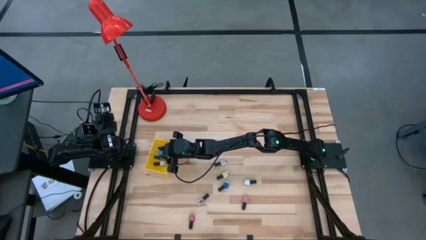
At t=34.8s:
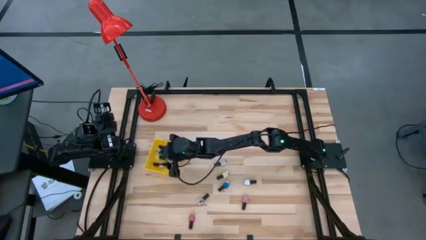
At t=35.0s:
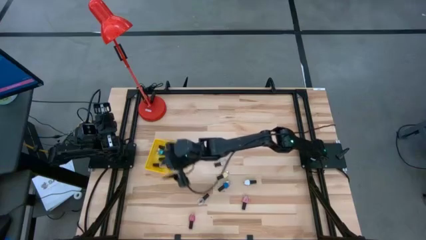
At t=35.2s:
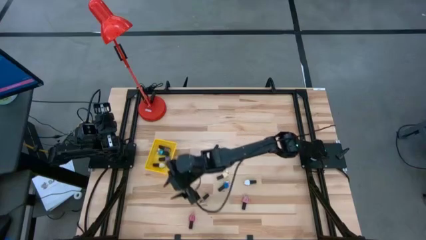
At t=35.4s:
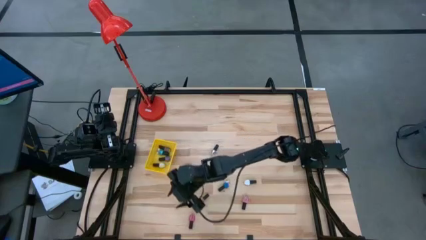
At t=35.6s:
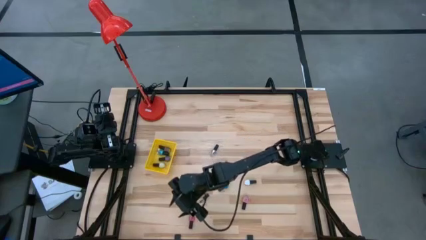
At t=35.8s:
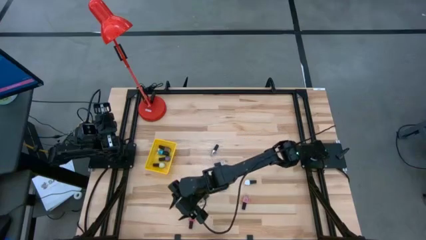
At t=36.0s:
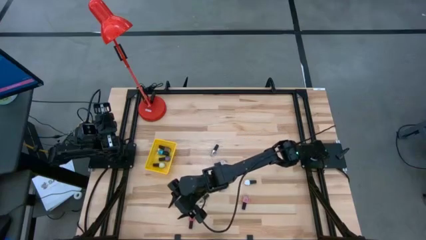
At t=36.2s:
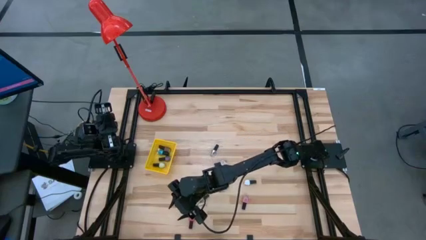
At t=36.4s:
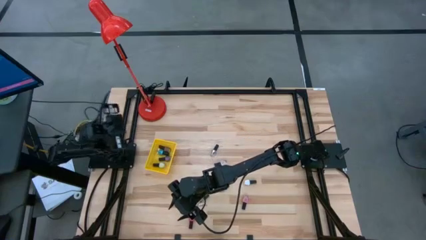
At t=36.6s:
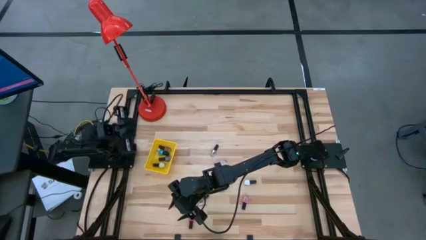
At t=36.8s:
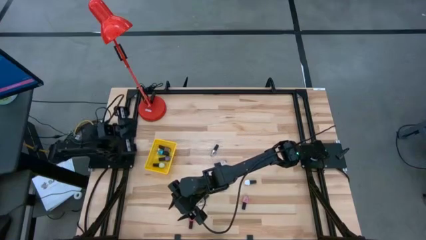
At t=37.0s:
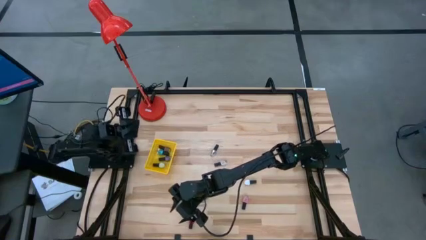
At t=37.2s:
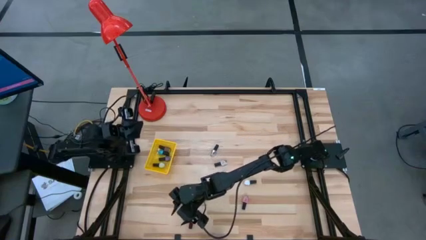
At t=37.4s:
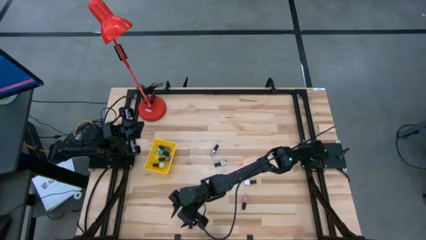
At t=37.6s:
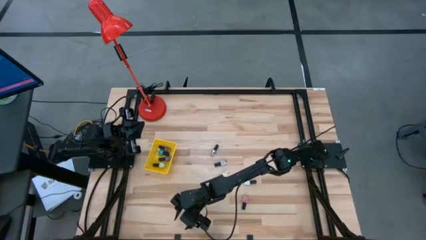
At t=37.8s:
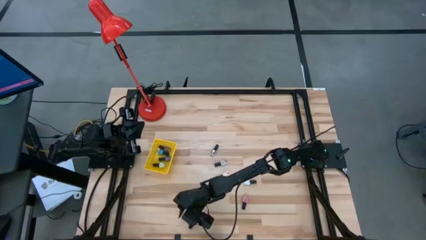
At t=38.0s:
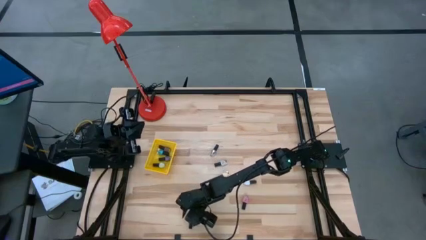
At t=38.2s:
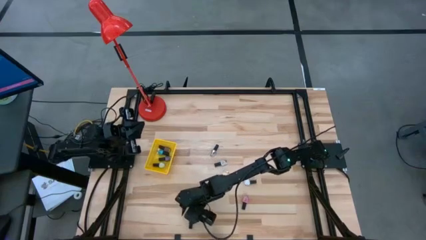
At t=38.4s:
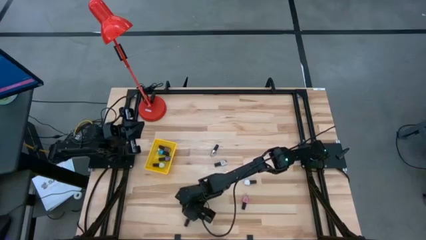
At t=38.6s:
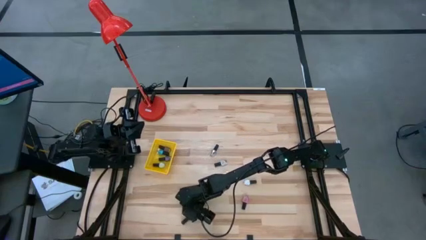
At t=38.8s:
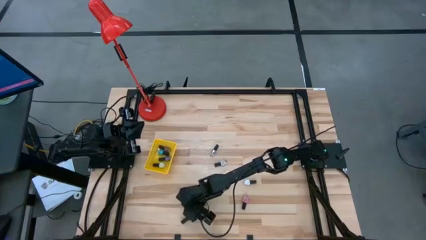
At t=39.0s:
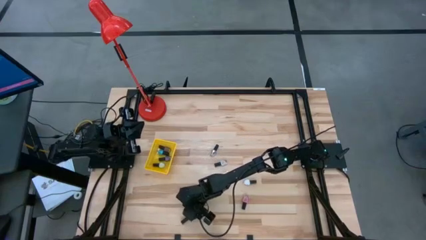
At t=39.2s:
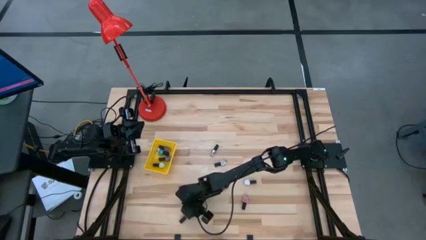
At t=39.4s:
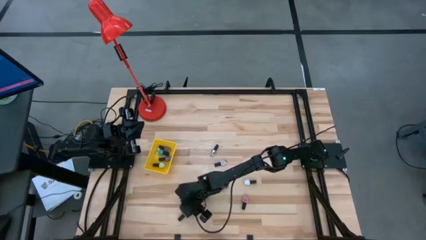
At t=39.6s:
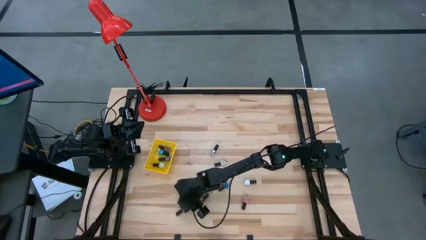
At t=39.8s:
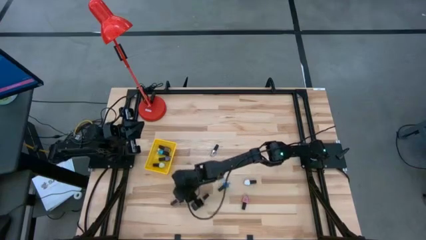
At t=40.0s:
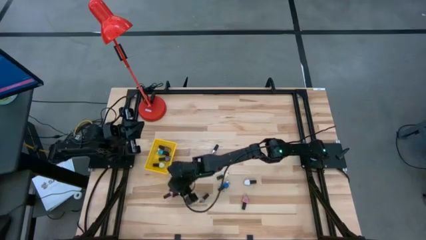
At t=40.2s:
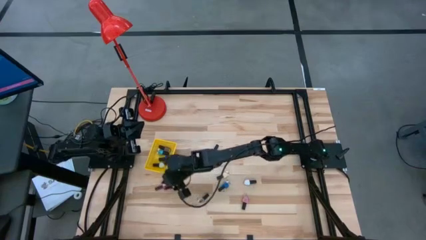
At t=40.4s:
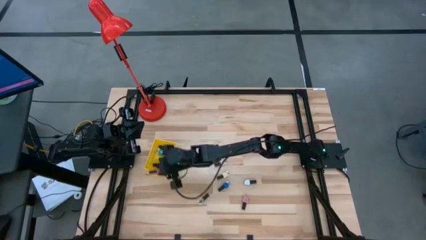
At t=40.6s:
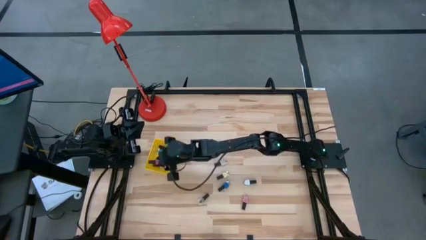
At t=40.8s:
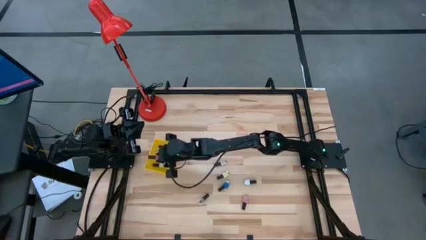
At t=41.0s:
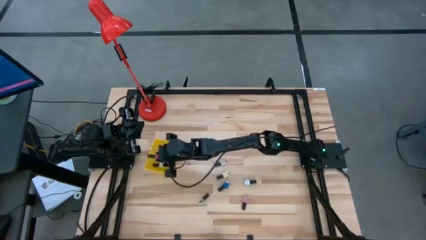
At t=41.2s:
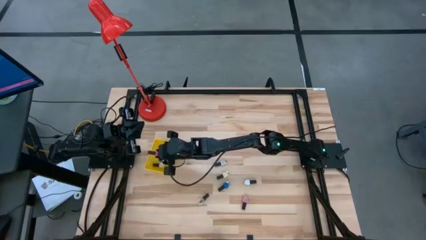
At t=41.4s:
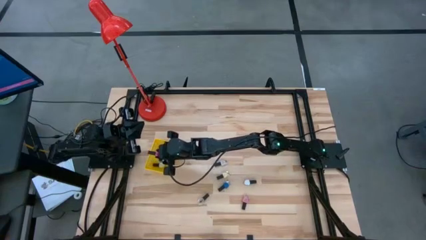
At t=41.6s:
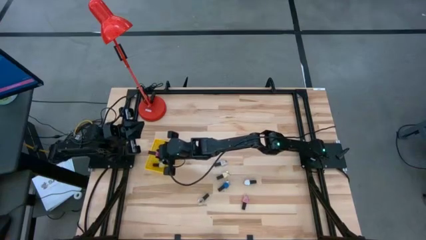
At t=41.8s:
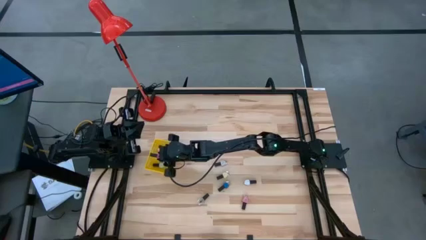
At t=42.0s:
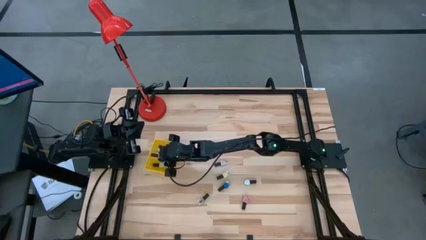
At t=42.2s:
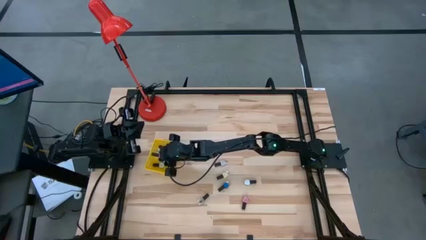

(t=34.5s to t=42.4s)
Task: Pick & Place Nail Polish
Put the red nail polish bottle into the yellow basket

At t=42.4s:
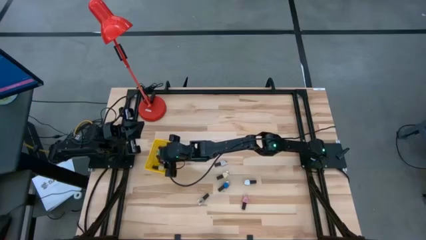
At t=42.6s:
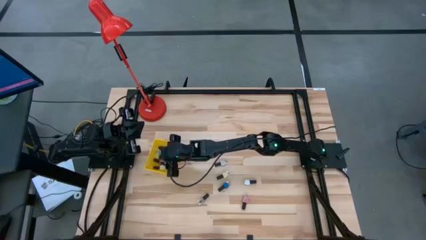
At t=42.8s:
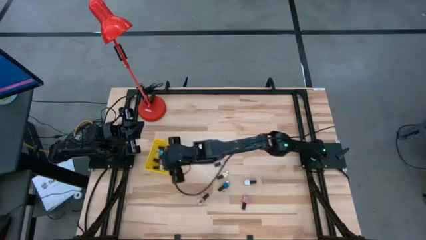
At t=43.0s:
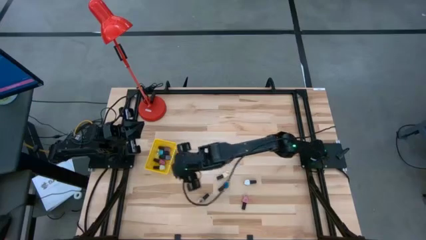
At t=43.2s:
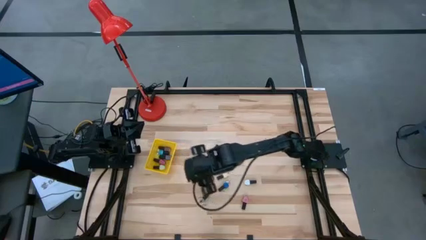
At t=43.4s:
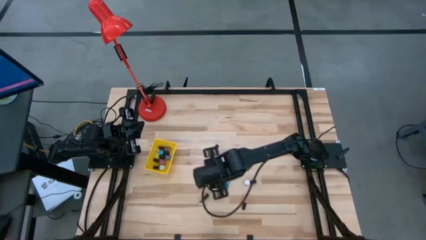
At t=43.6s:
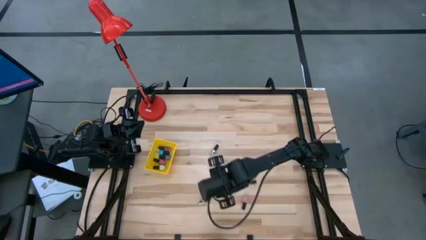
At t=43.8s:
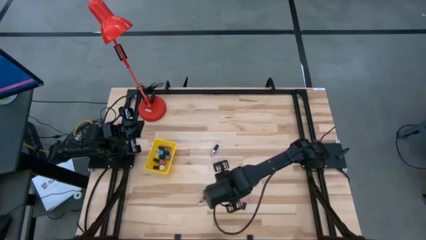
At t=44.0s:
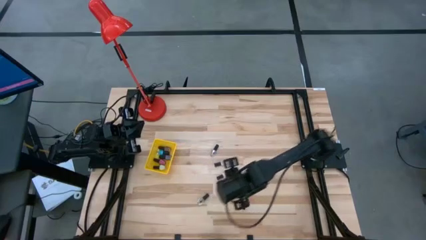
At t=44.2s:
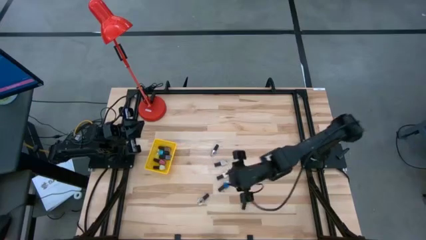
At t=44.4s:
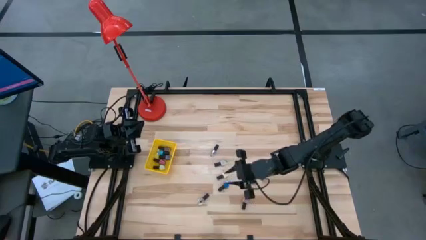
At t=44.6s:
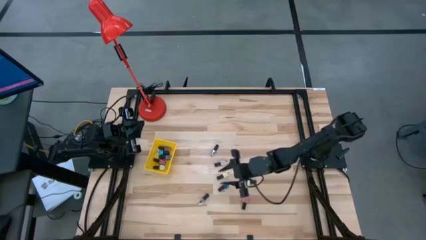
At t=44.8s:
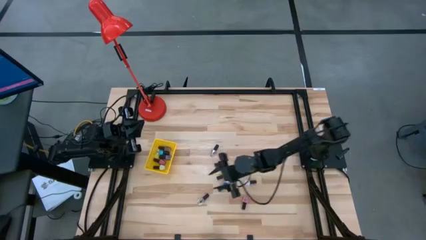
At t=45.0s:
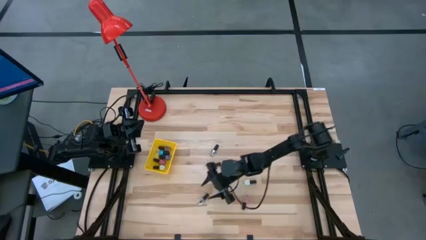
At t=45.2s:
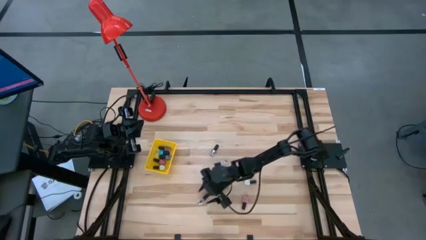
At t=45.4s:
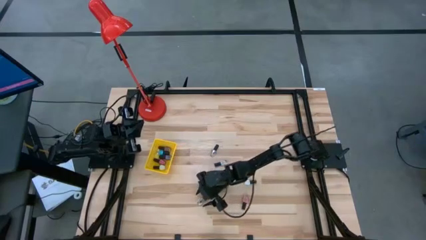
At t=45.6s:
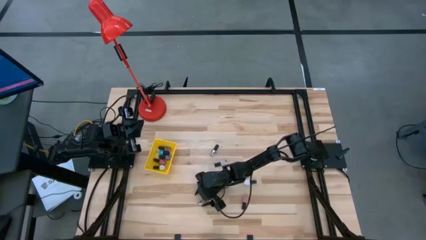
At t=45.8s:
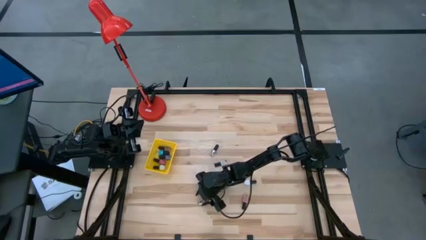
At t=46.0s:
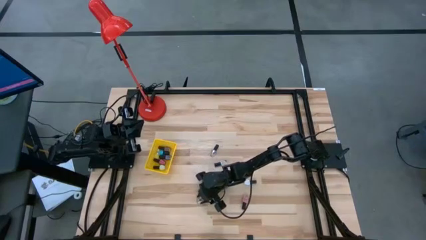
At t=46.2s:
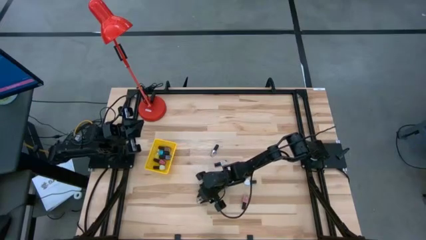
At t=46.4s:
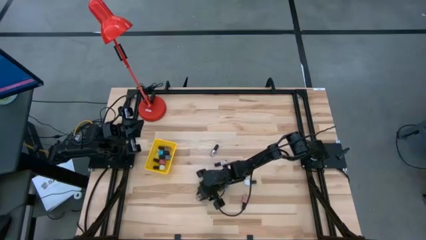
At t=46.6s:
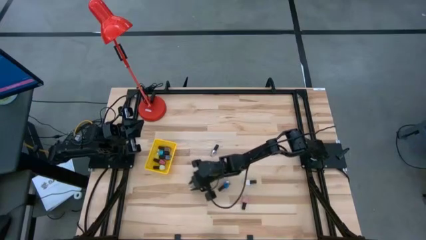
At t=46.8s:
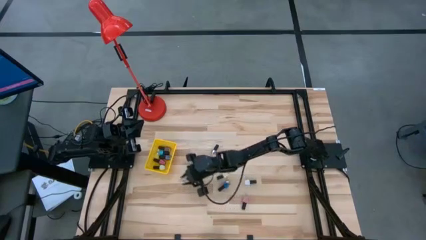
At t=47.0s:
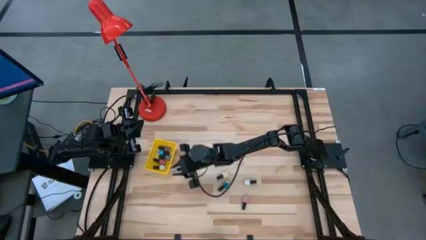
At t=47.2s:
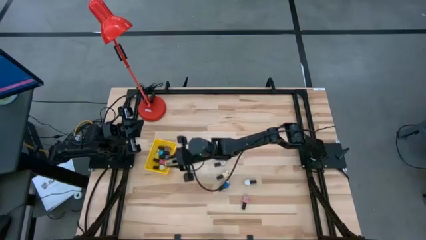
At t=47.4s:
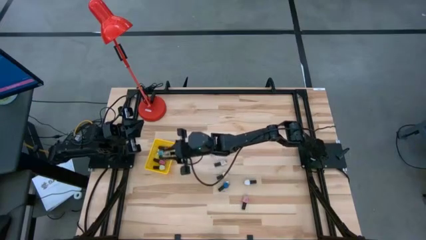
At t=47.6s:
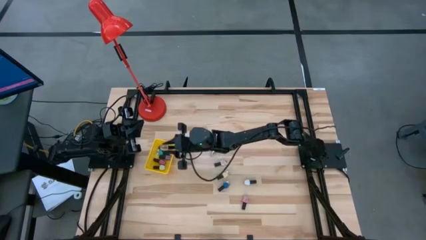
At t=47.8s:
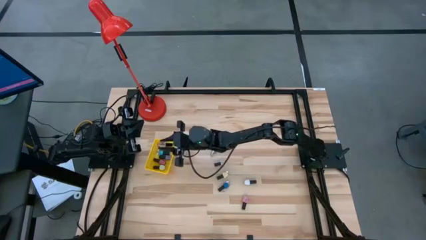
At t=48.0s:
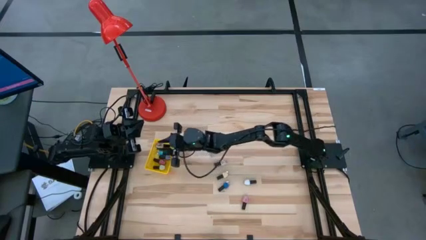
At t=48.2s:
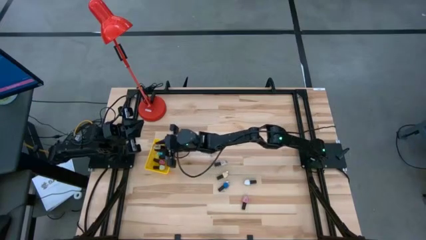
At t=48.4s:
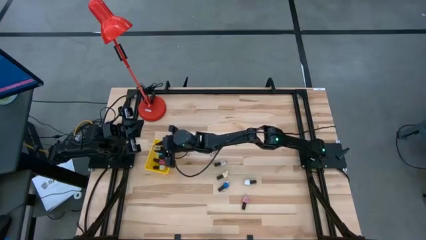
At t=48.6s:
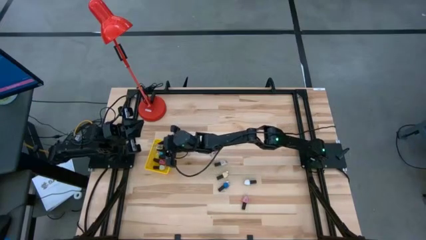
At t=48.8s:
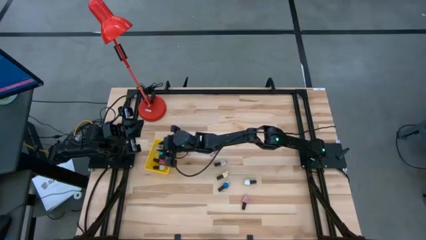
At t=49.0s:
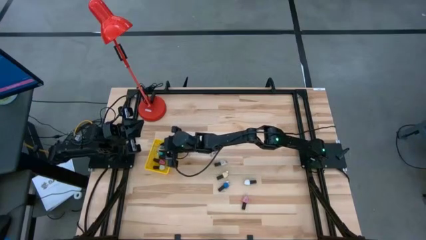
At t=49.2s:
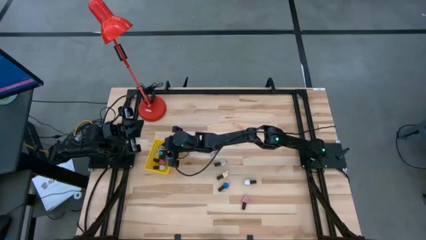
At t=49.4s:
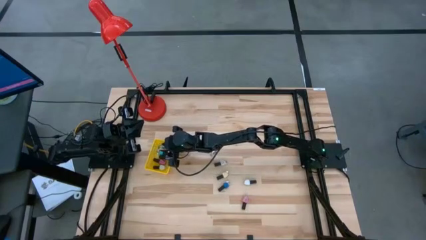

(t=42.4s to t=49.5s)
Put the bottom transparent nail polish bottle into the yellow basket

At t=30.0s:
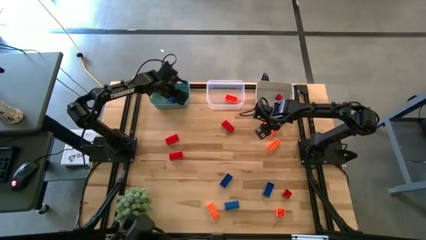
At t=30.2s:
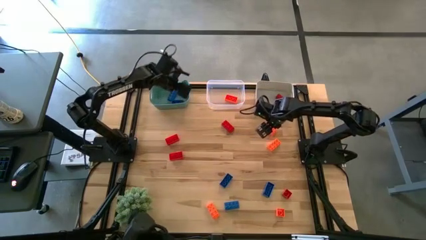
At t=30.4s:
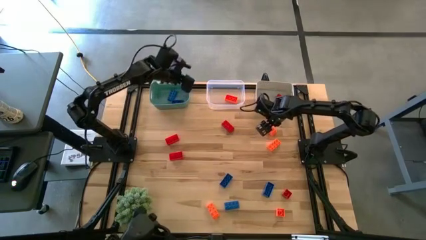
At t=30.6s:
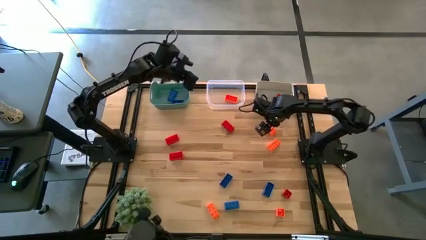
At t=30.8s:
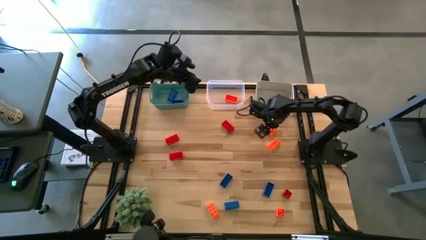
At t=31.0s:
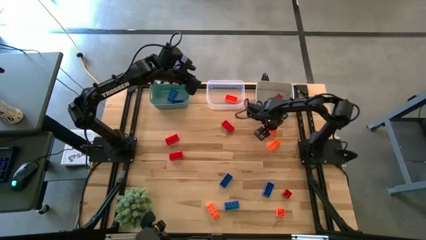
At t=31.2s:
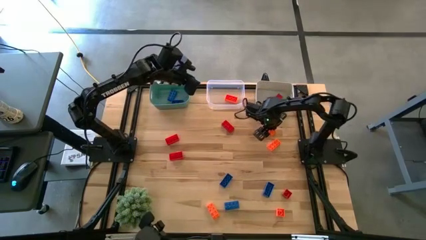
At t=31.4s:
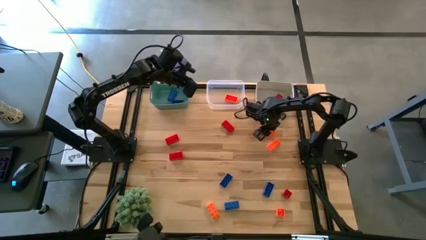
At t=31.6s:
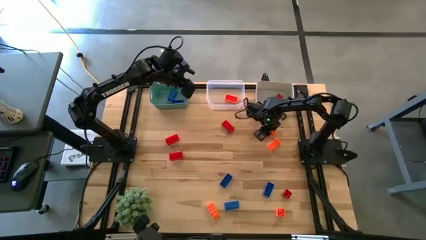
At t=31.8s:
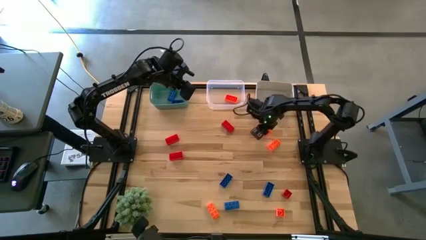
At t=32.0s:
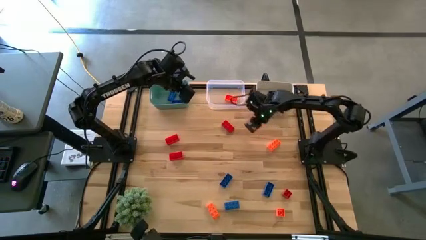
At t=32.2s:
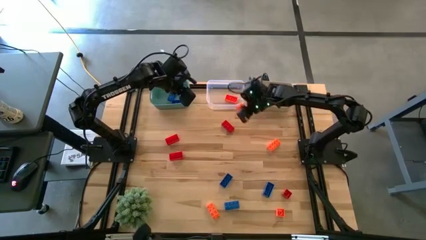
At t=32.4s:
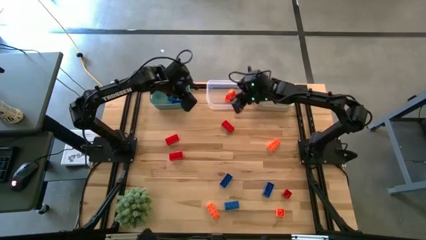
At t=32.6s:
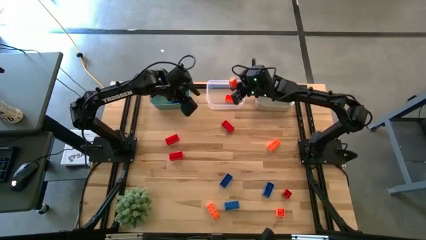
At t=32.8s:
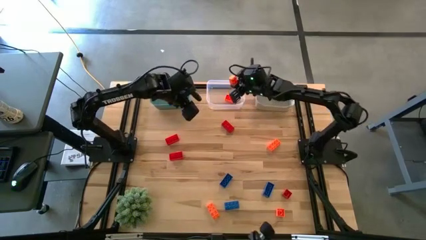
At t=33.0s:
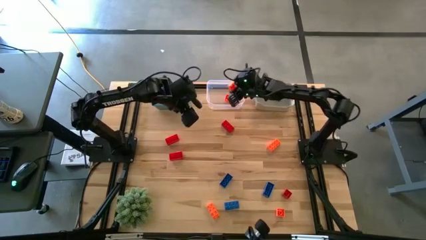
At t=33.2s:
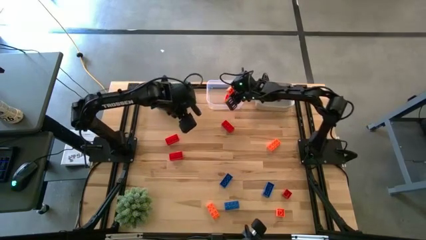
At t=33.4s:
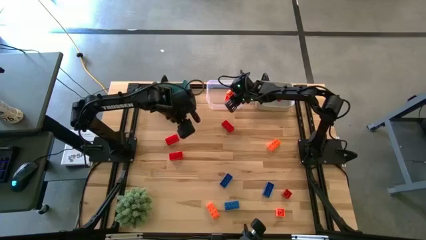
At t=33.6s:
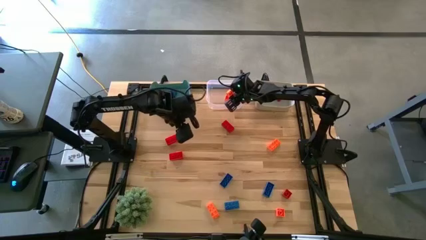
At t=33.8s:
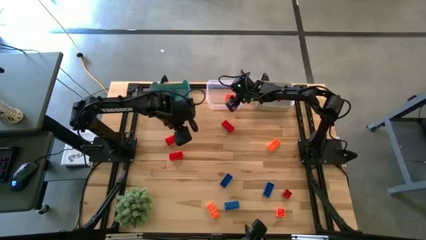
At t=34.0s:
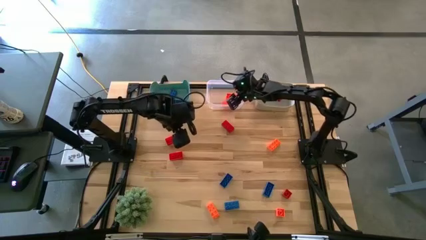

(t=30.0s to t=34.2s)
Task: Sort & place blocks by color
Put the orange game piece into the transparent bin
